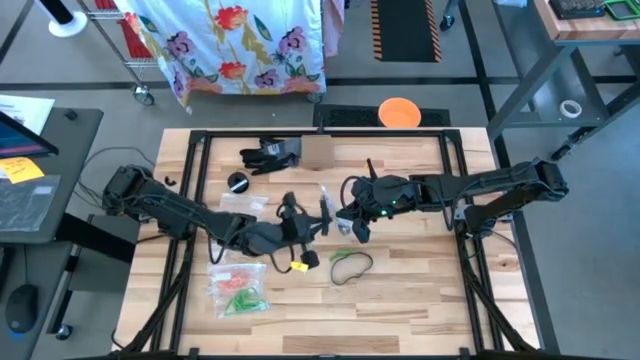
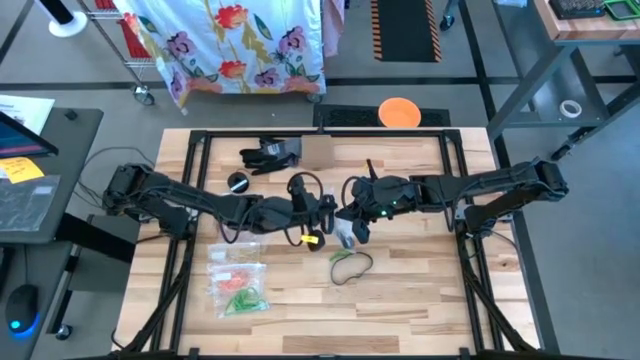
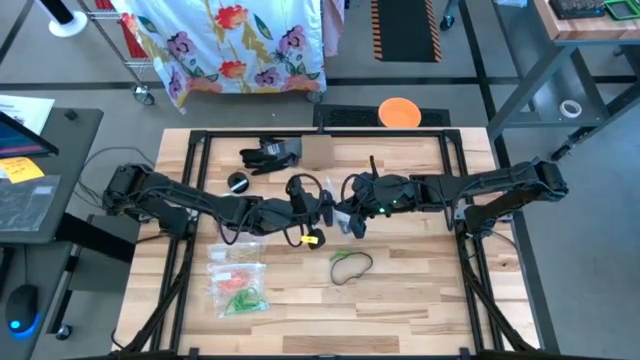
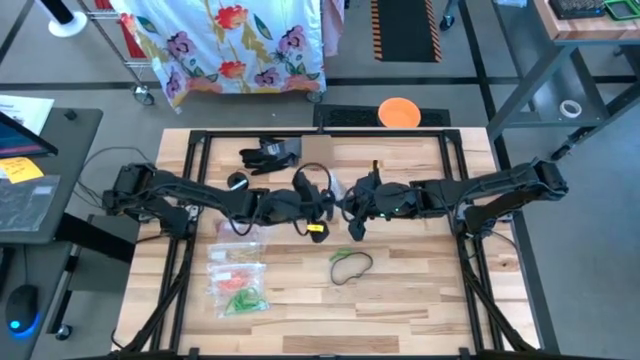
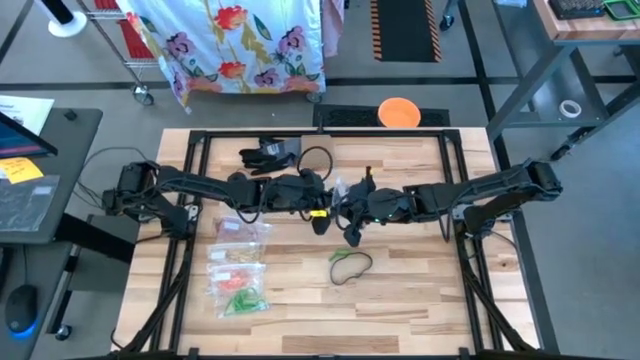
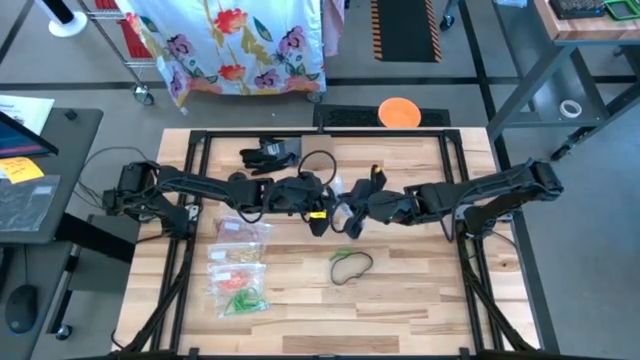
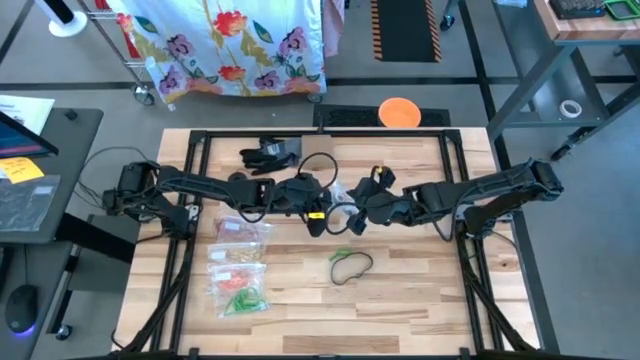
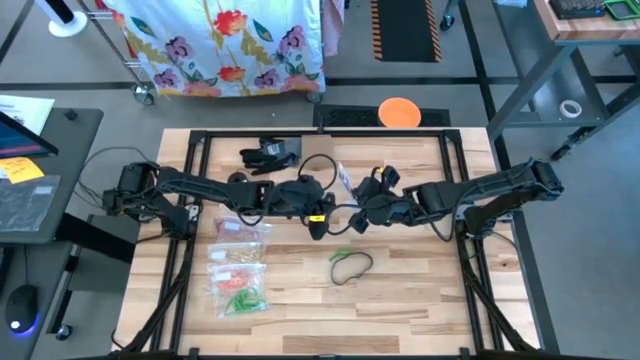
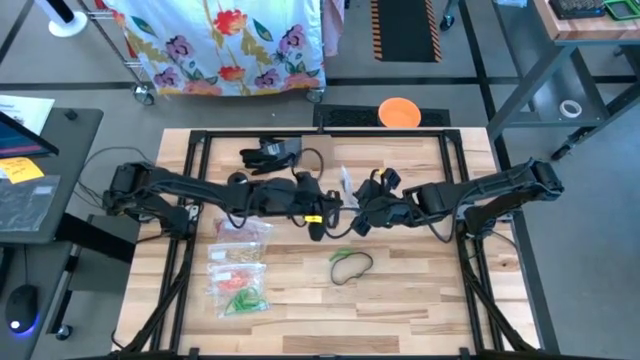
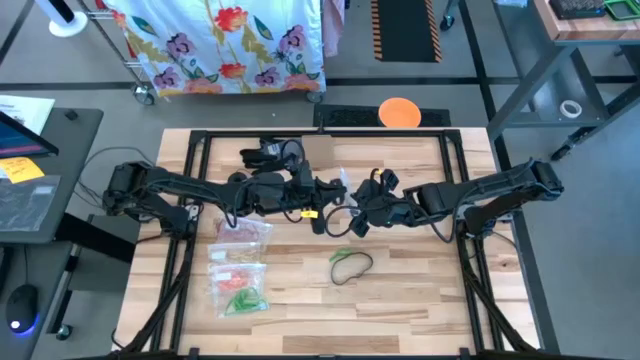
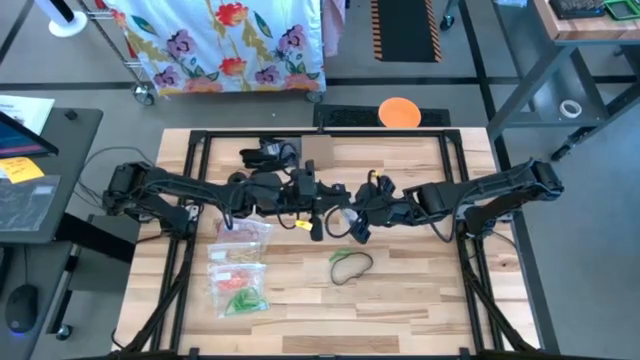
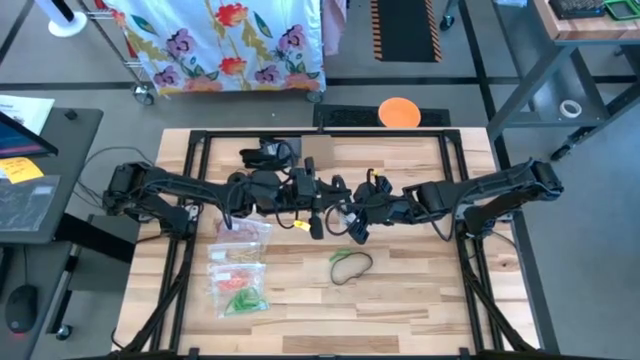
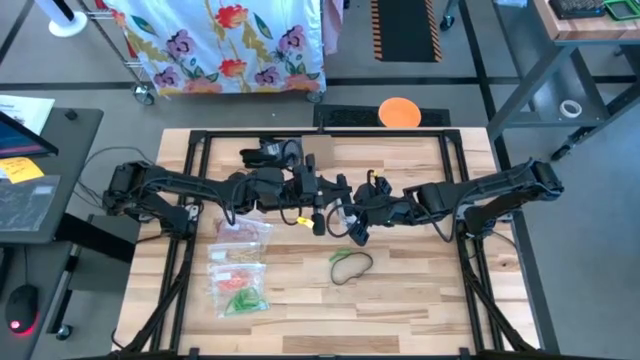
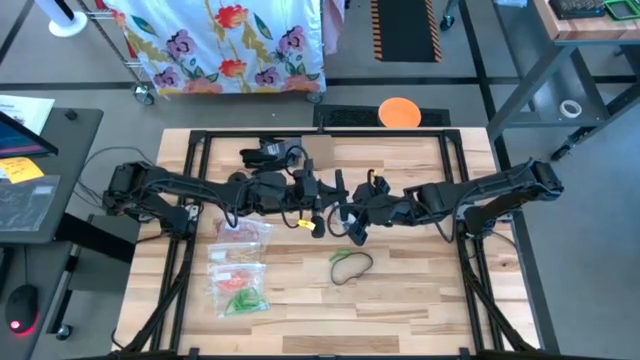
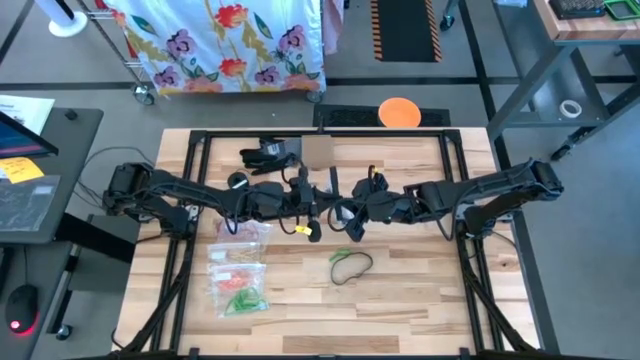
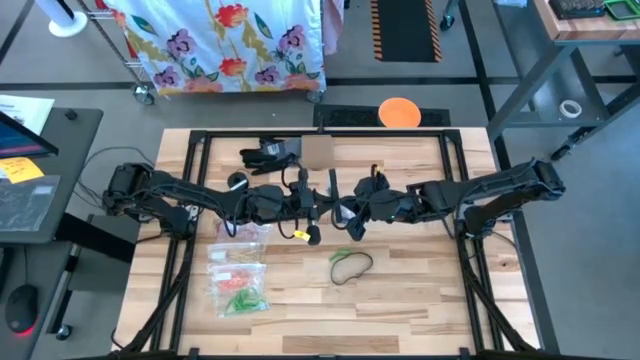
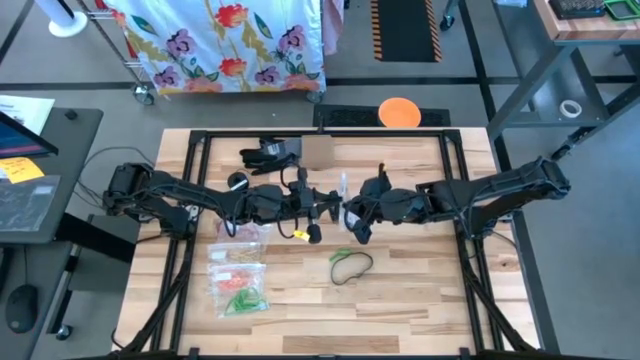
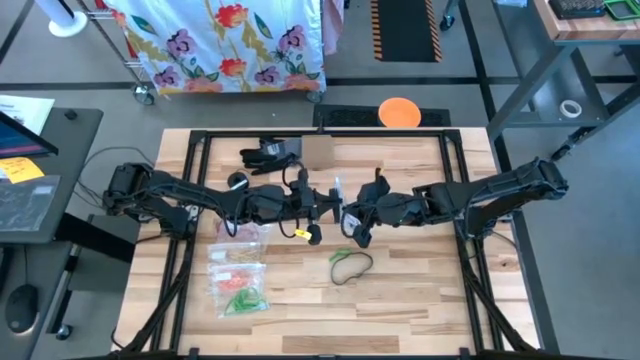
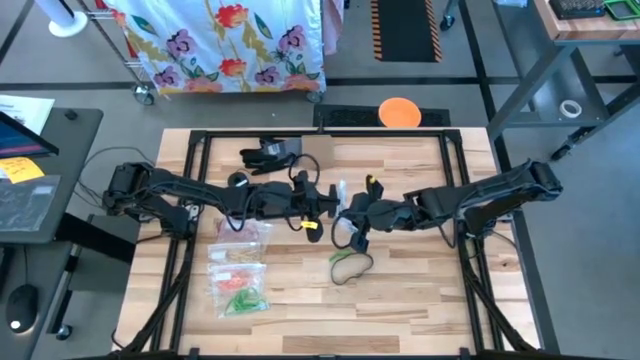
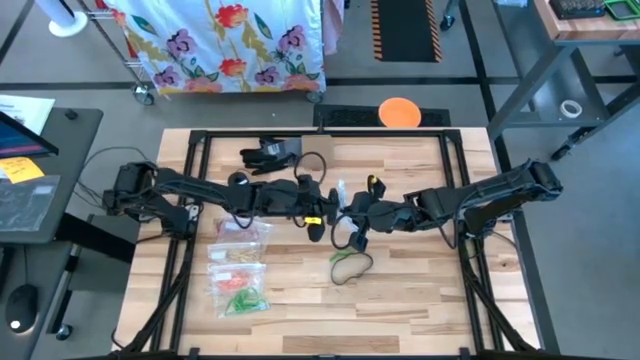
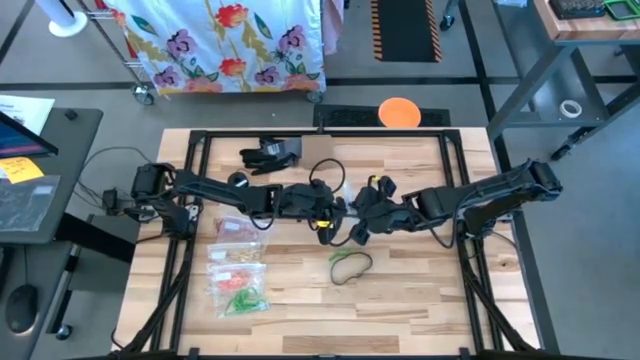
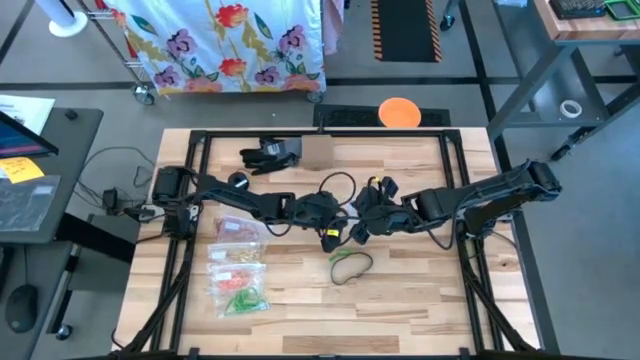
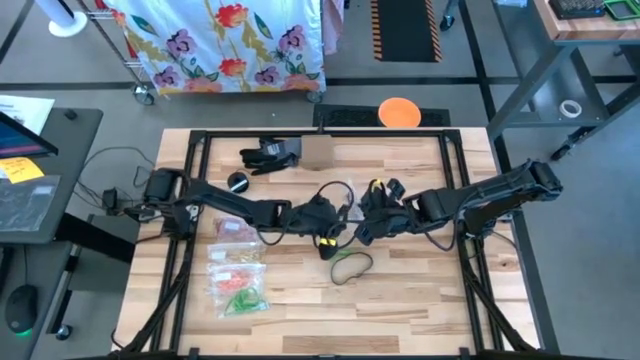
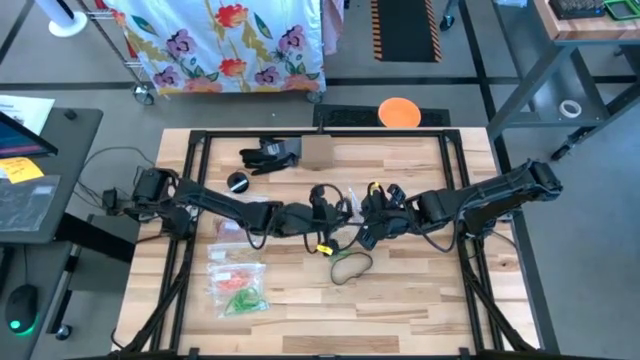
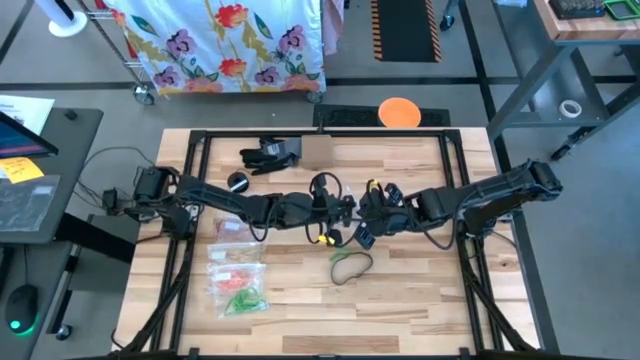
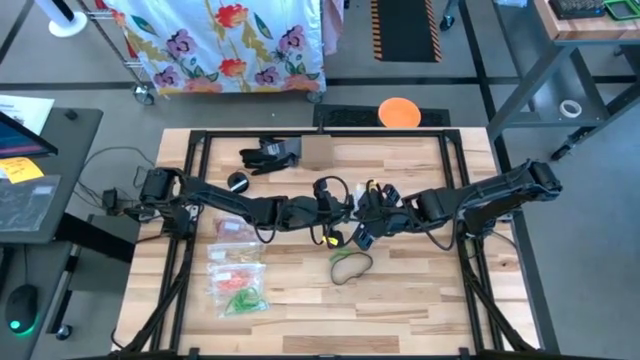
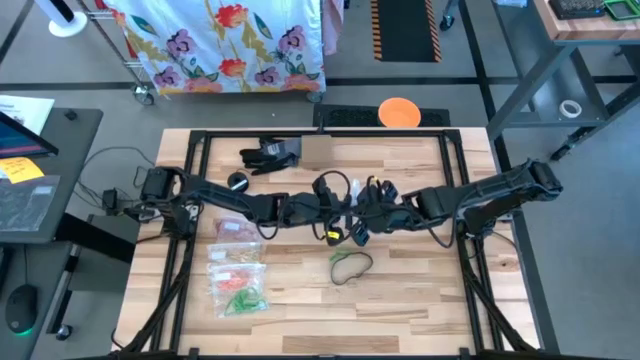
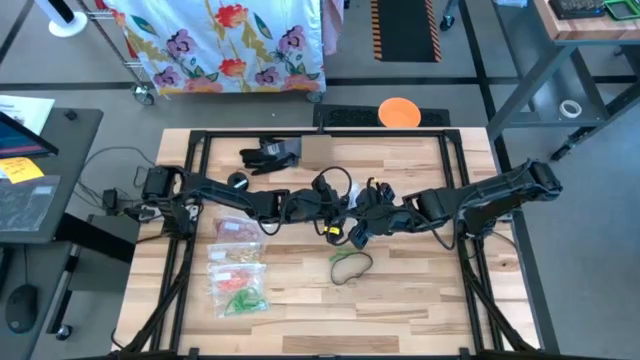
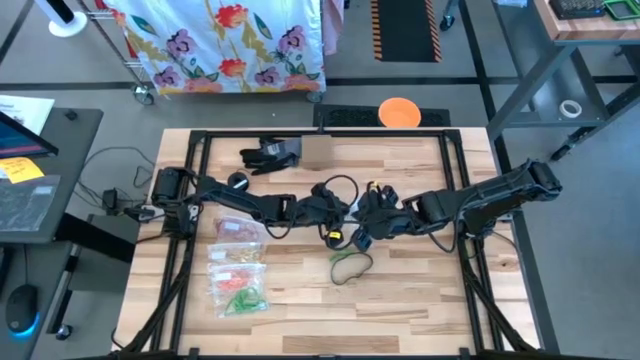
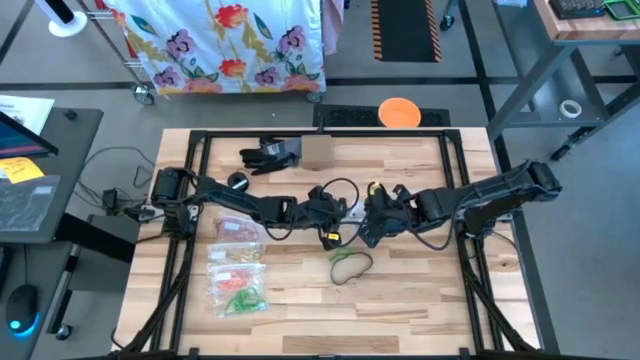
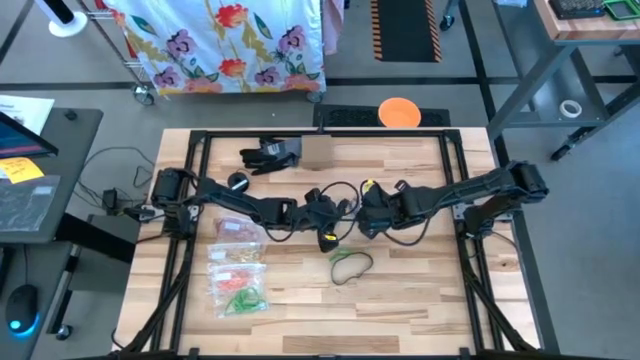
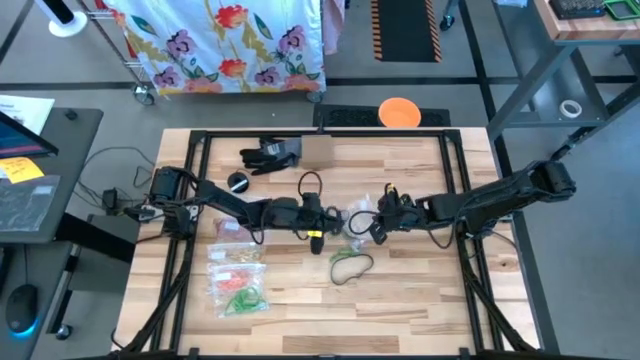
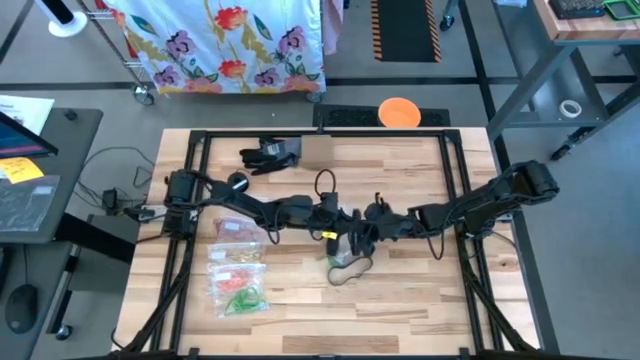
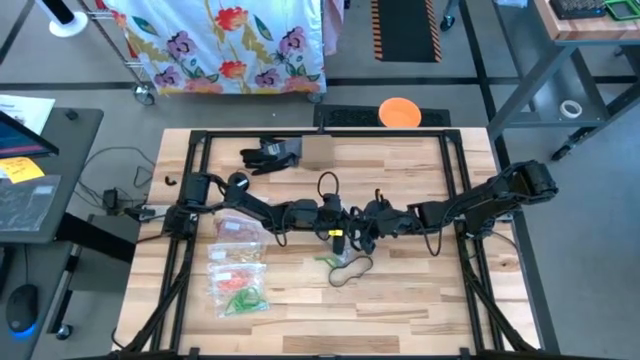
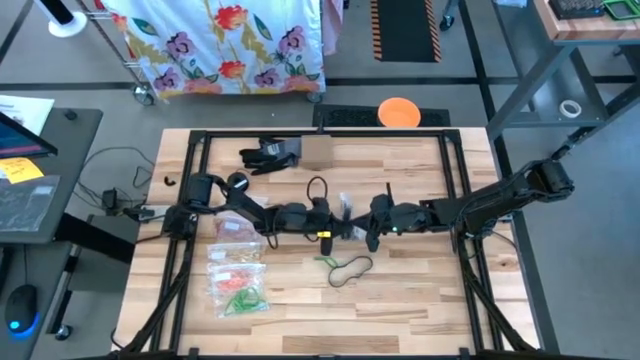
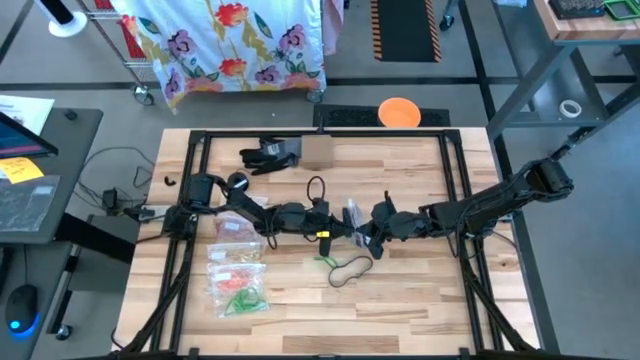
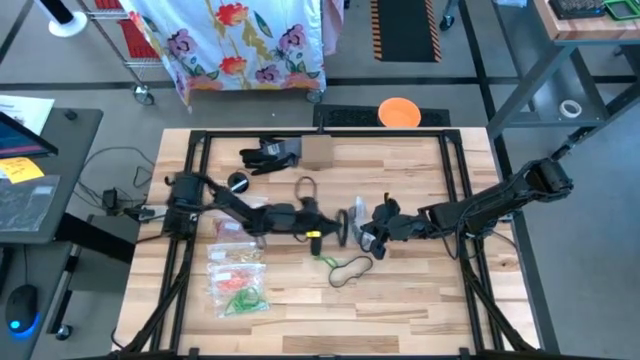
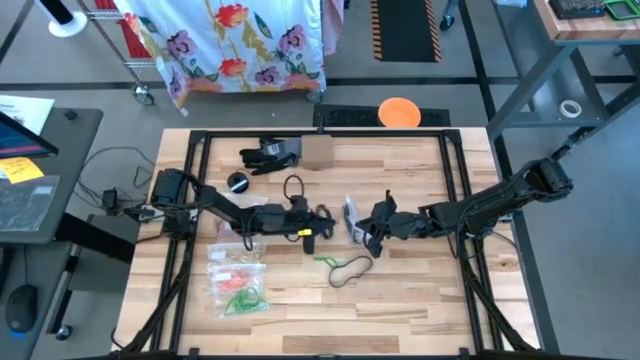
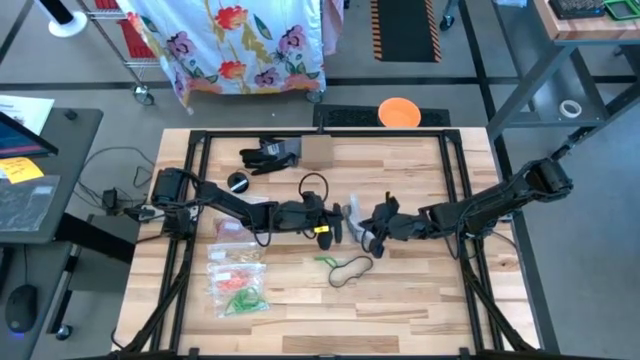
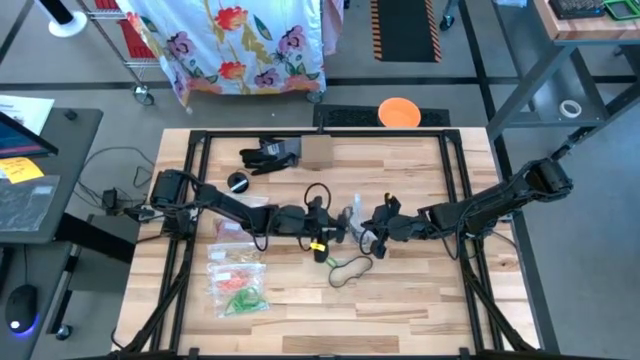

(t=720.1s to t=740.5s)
Task: Sort rubber bands
Put the black rubber band into the transparent zip bag

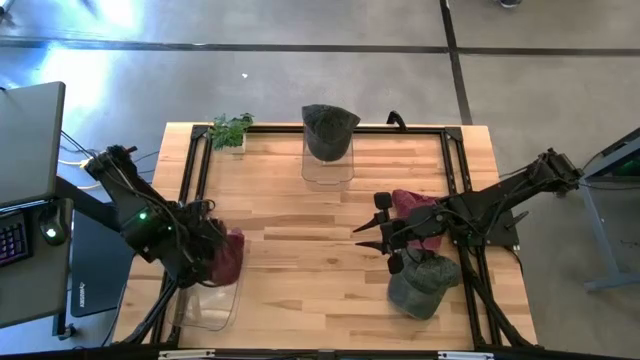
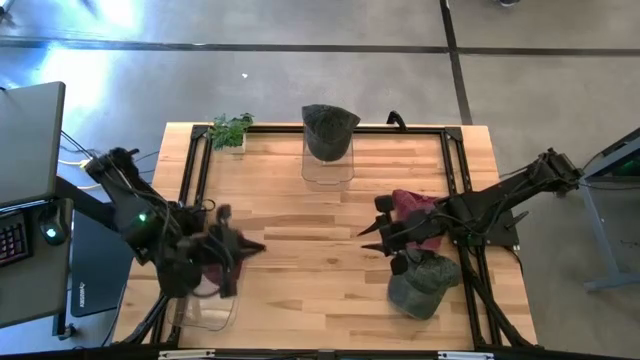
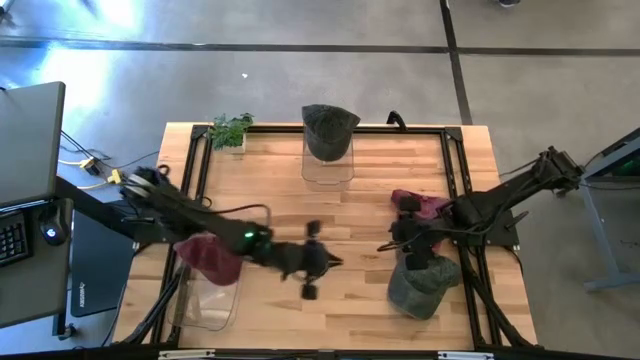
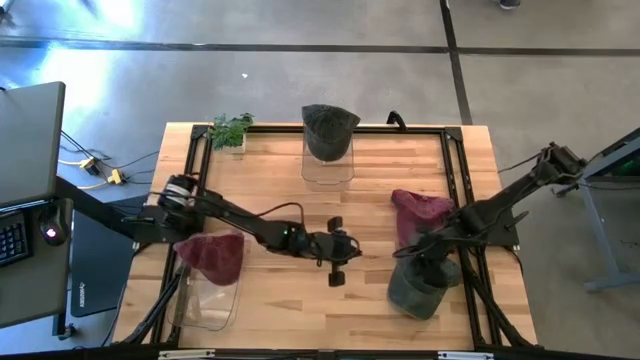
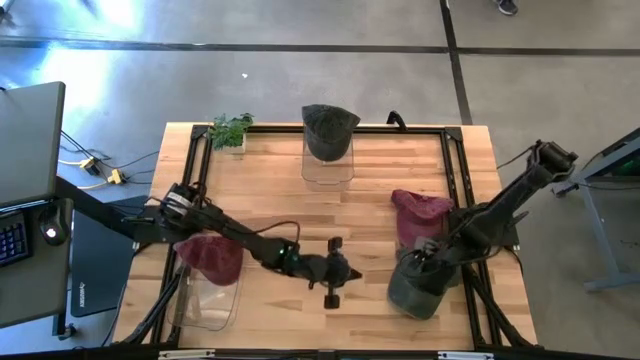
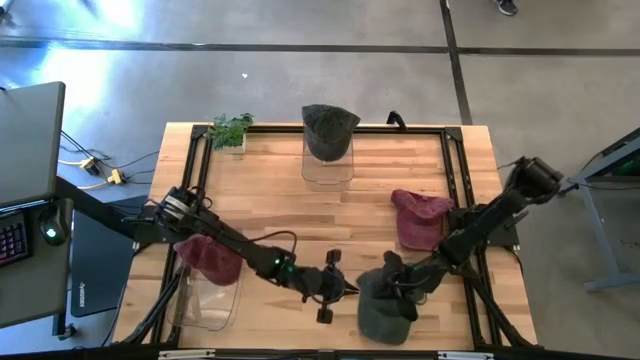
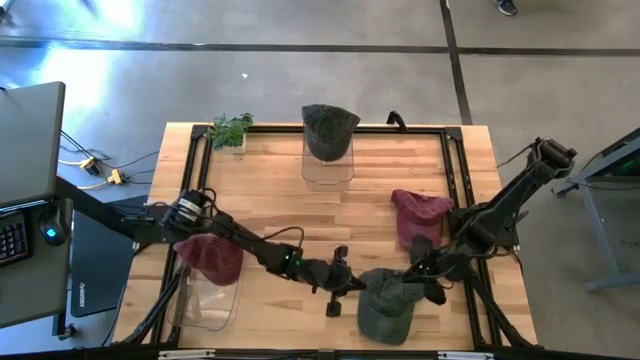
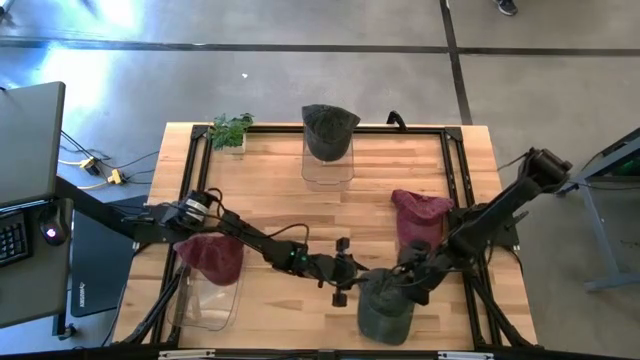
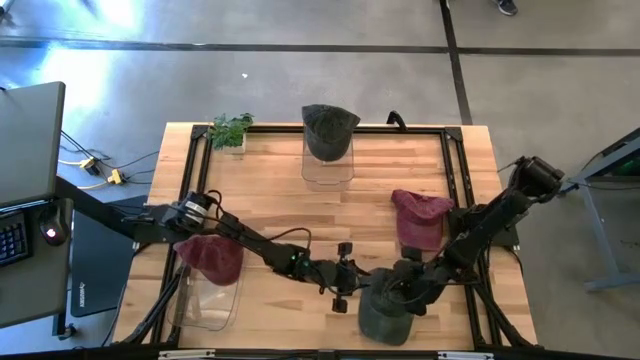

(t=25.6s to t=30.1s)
Task: Pick & Place hat
Put the black cap into the top transparent bin
